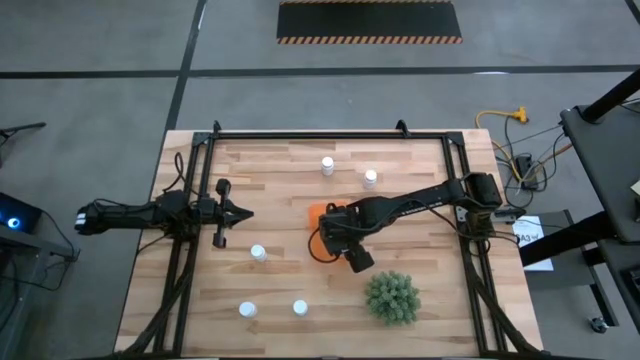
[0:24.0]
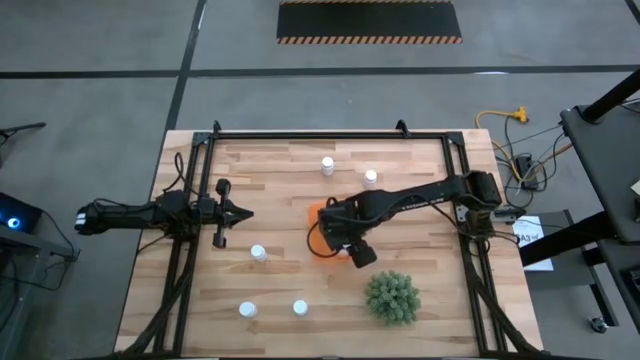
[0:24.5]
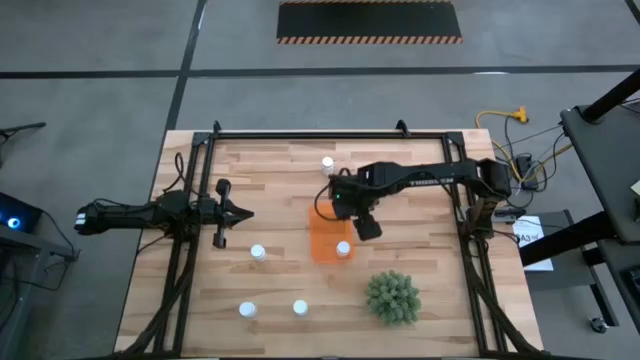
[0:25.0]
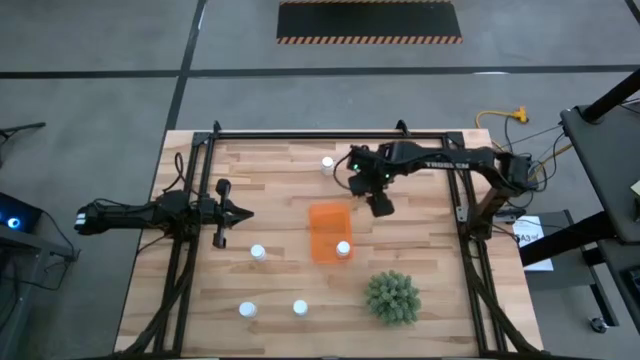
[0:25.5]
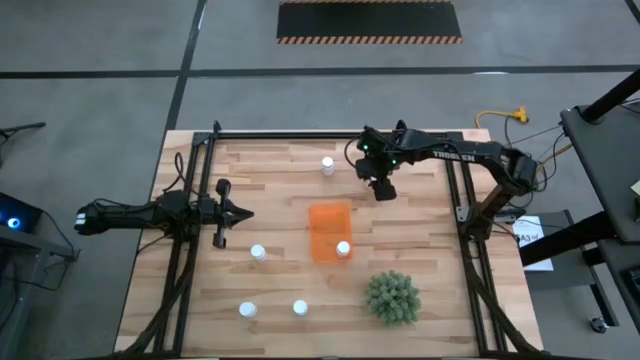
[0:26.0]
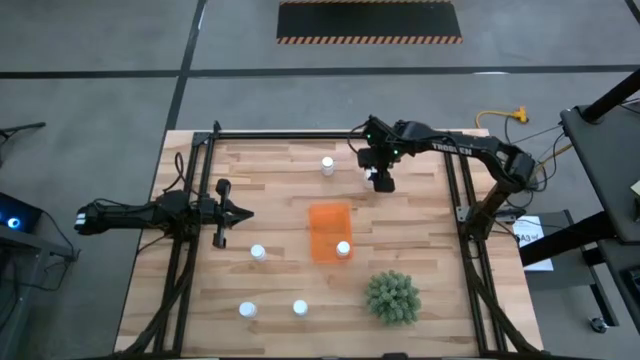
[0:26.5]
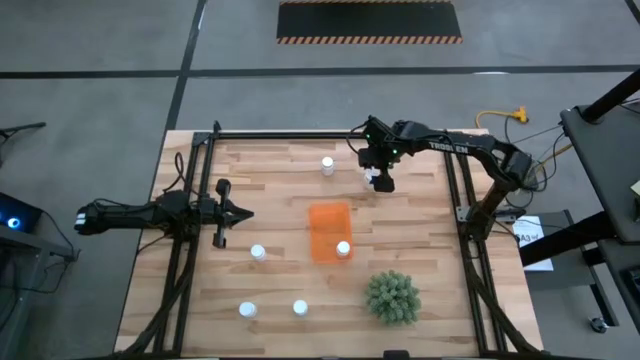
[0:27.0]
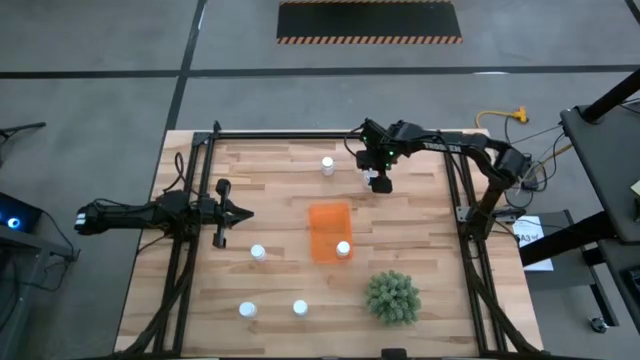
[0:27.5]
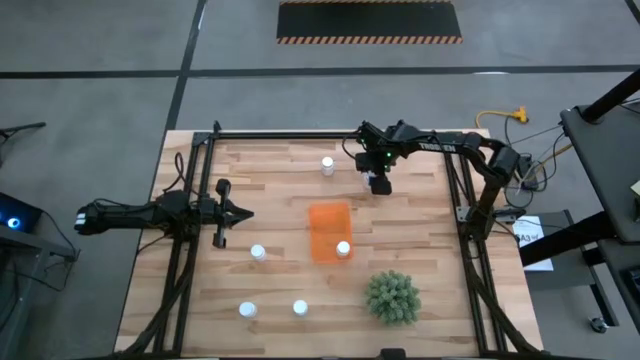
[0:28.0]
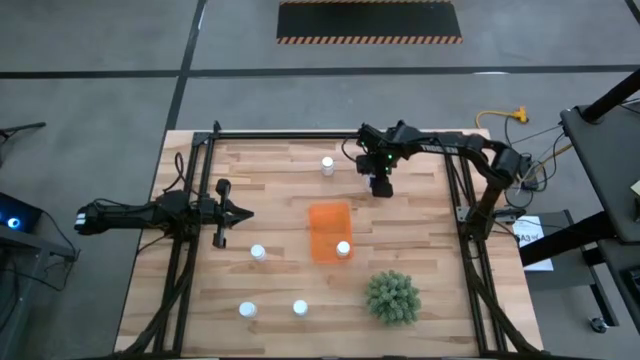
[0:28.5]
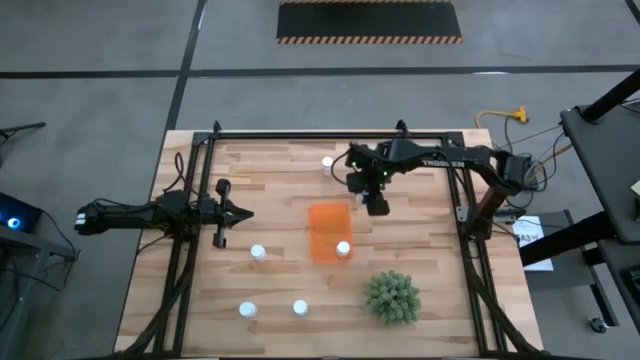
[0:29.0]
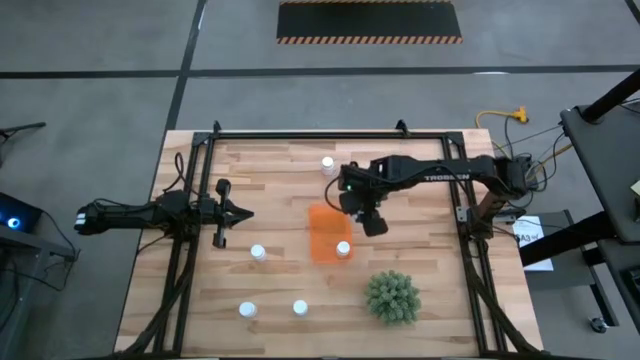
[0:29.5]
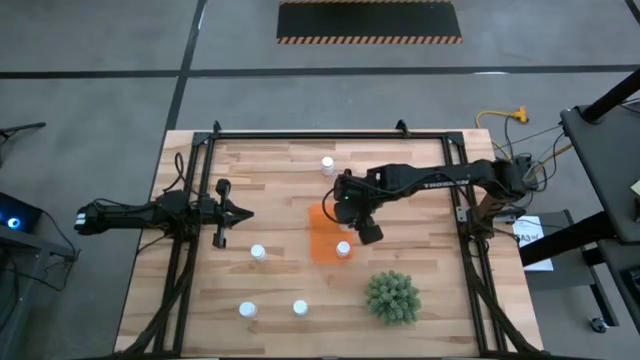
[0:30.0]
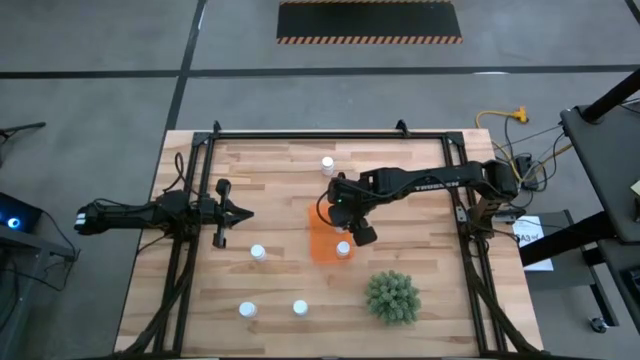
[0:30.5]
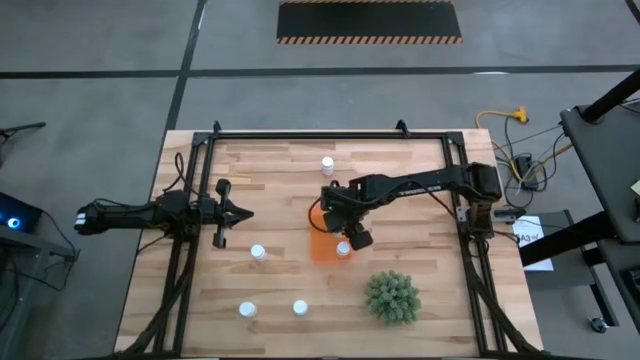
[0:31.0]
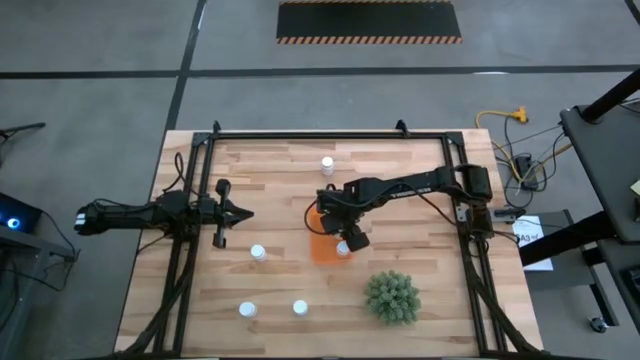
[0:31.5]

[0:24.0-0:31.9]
Task: Pick and place pill bottles into a basket
Put the white pill bottle into the orange bin

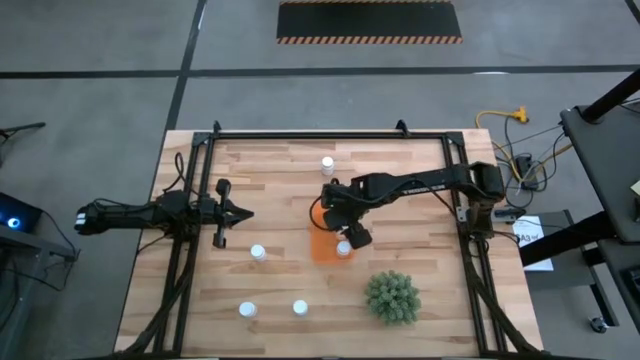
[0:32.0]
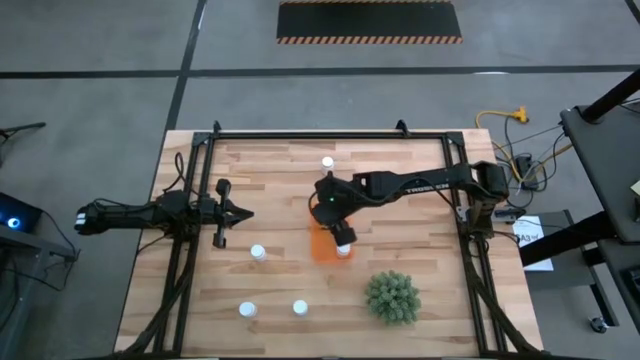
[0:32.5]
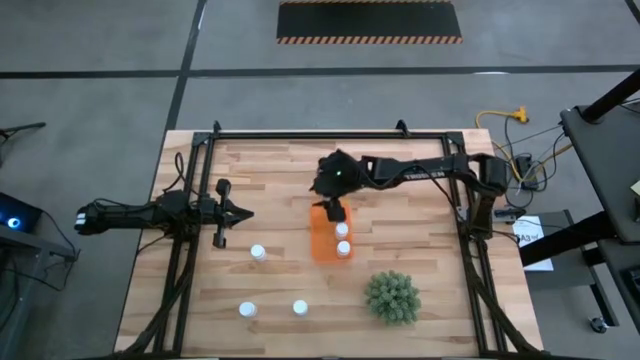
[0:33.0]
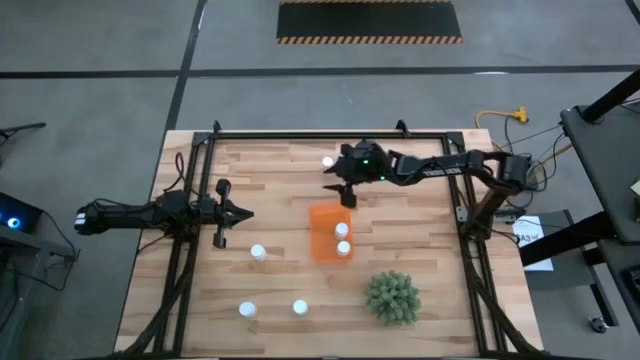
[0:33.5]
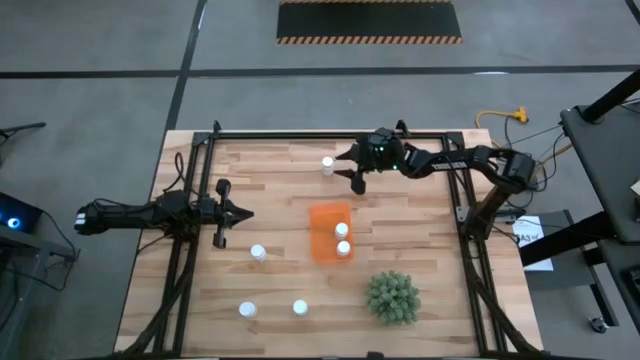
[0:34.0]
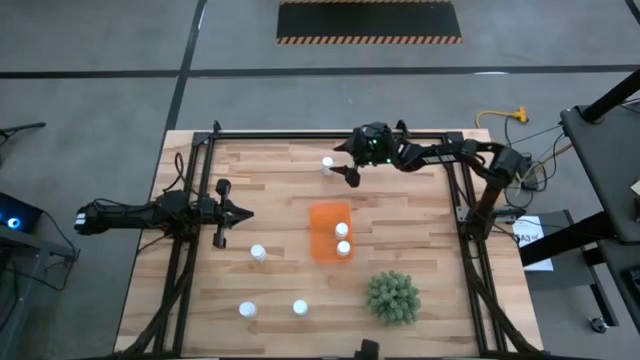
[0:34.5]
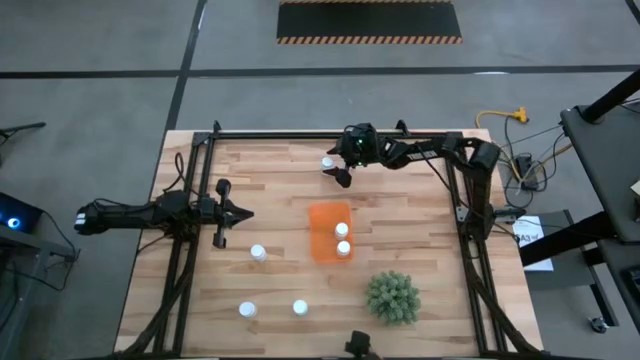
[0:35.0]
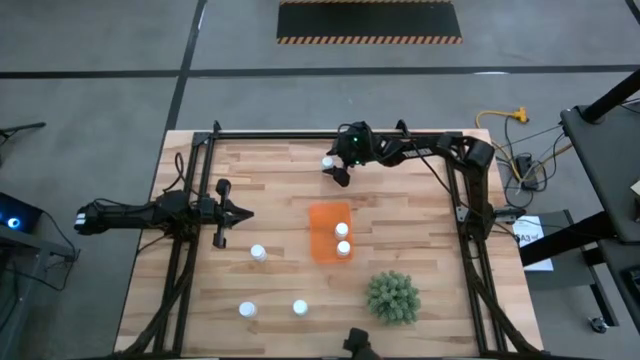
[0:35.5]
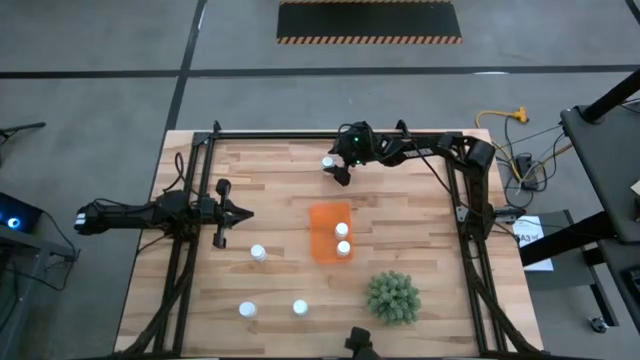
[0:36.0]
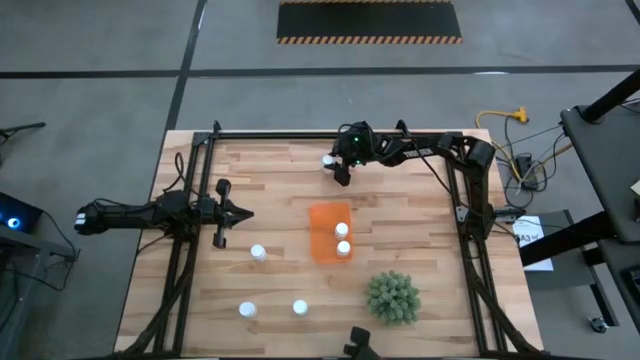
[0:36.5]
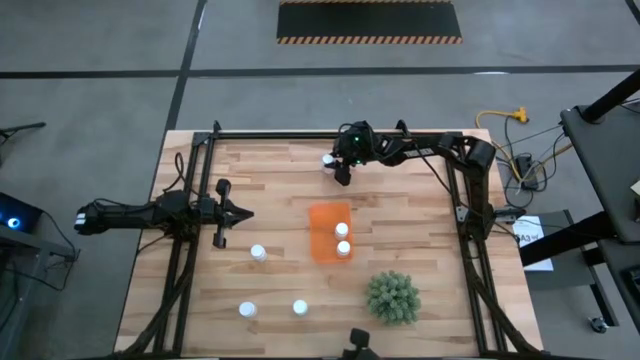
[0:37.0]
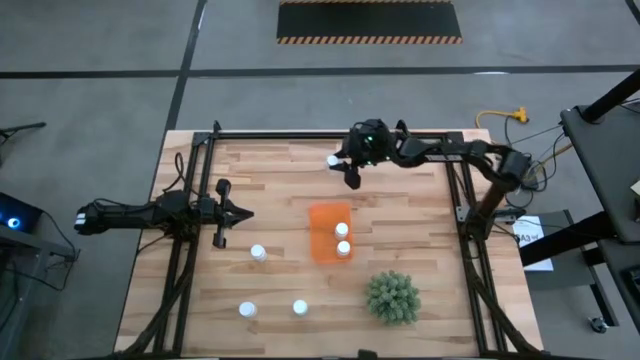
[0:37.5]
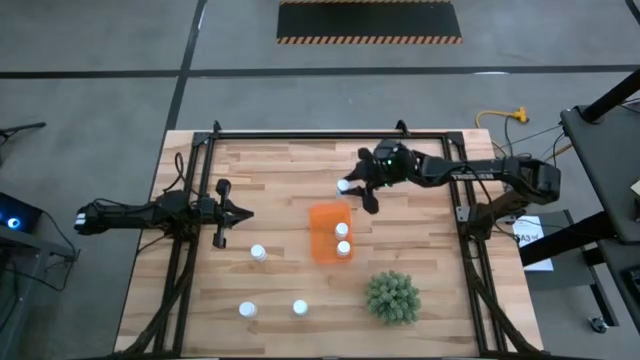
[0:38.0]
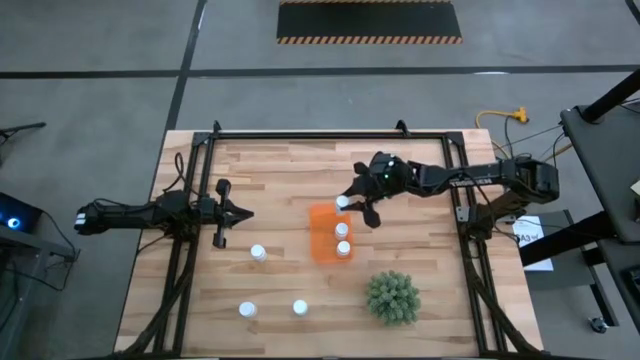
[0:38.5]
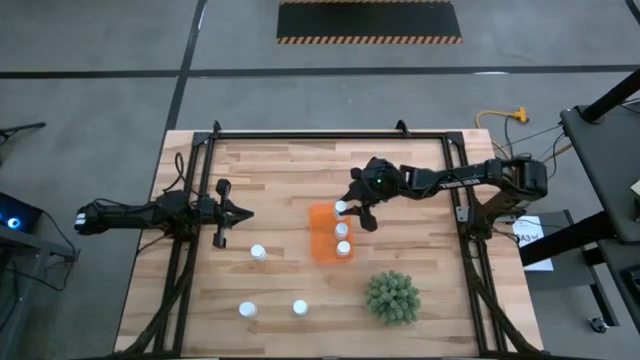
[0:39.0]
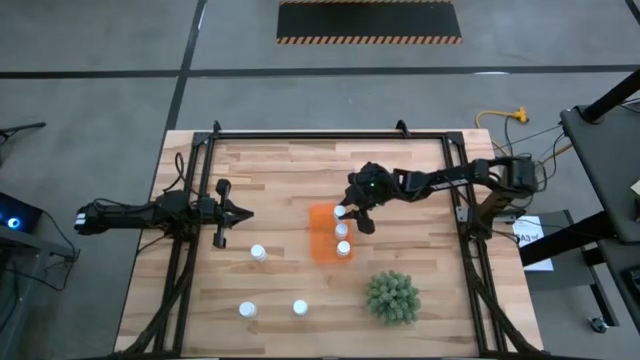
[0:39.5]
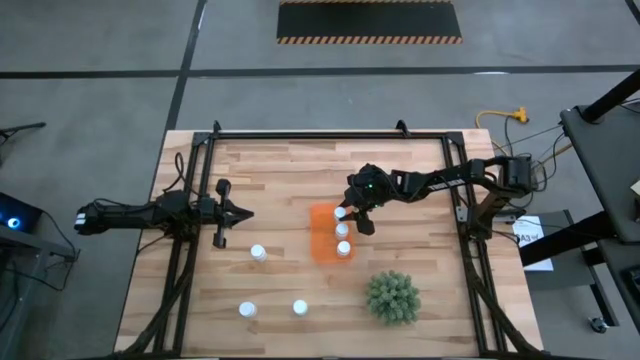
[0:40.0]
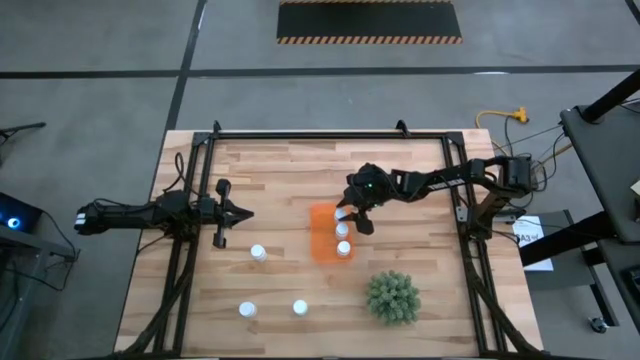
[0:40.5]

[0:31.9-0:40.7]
Put the white pill bottle into the orange bin

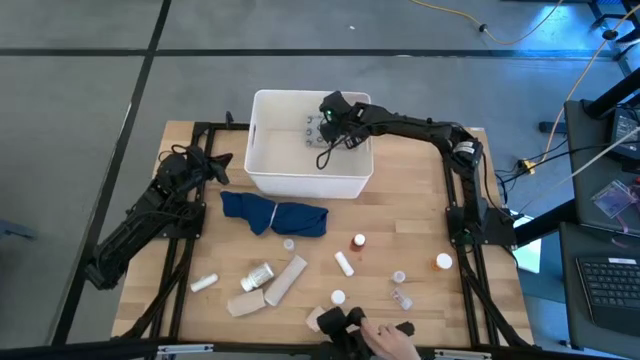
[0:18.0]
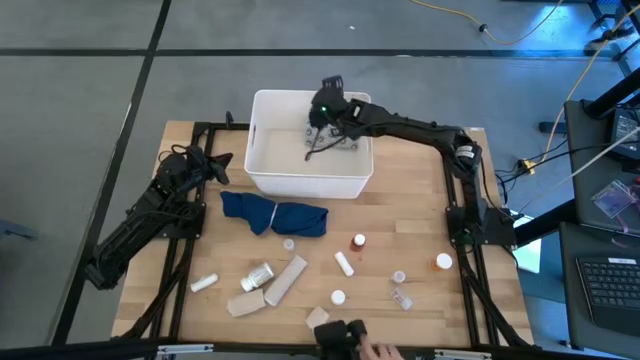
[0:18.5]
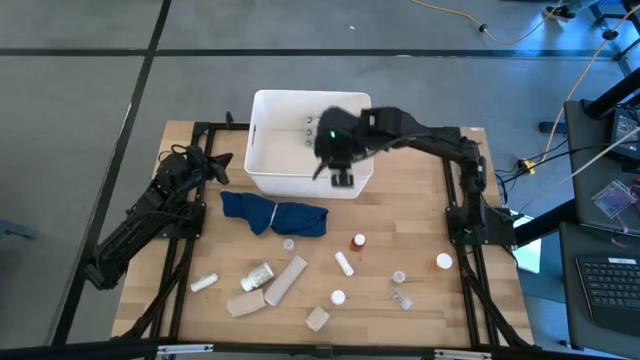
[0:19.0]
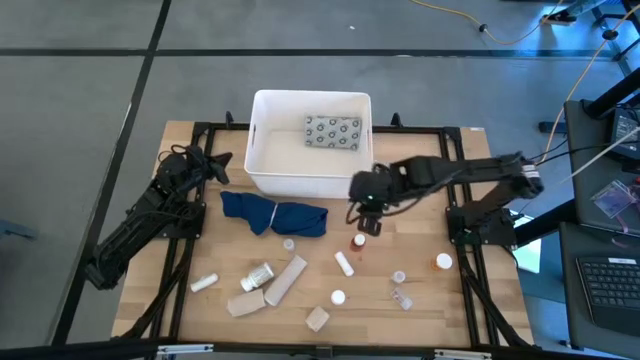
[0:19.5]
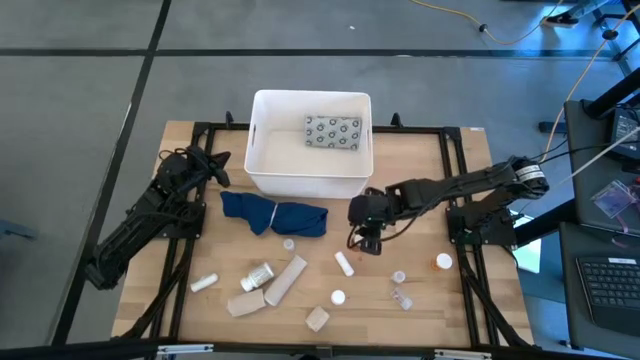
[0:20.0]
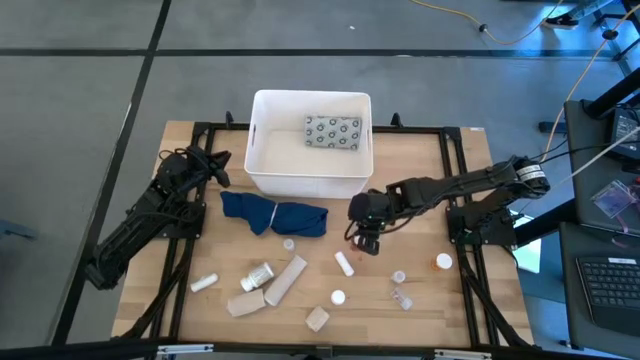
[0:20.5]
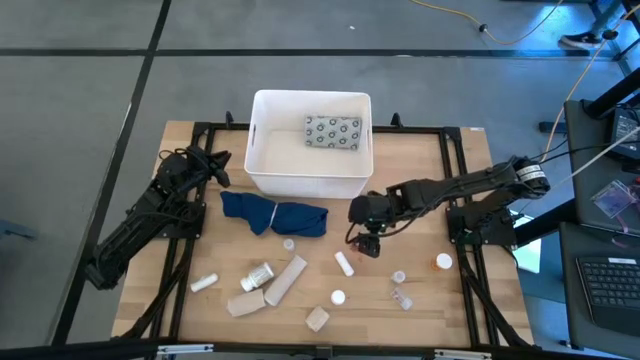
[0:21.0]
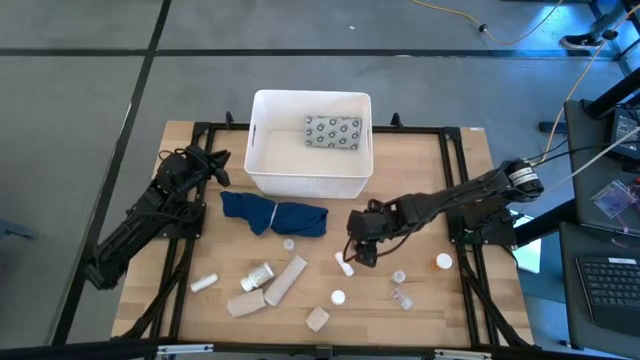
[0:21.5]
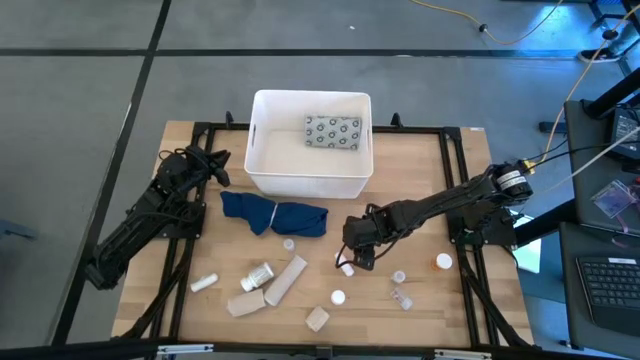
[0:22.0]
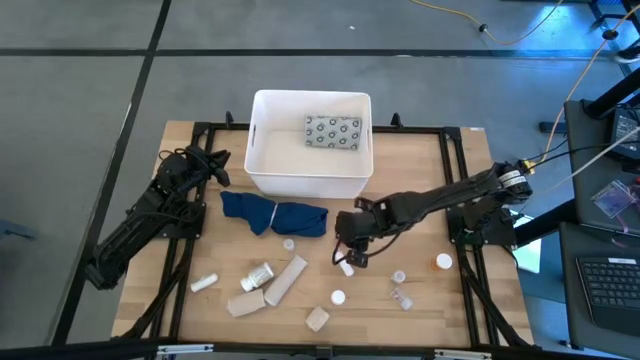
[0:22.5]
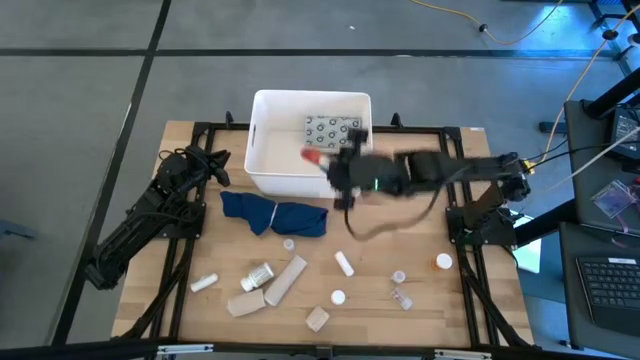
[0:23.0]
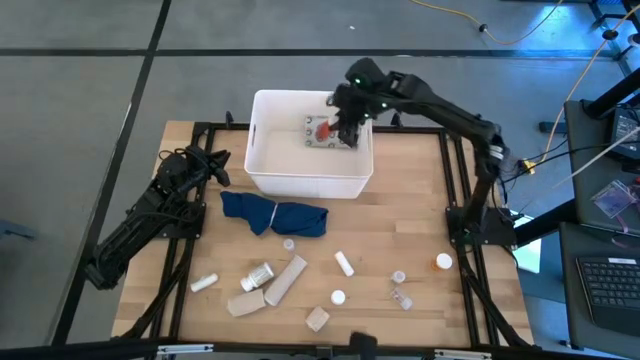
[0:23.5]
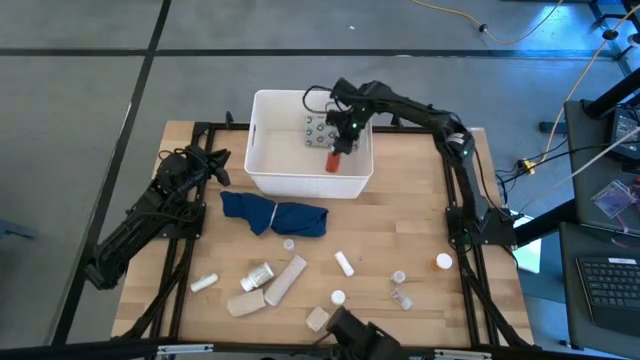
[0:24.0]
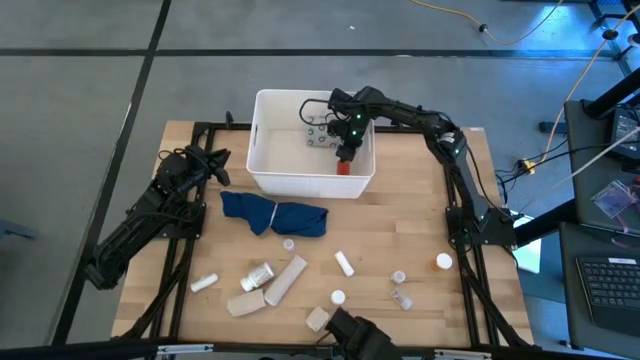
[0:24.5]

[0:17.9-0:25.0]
Task: Pick & place medical supplies in basket/bin
Put the brown medicine bottle into the white bin
